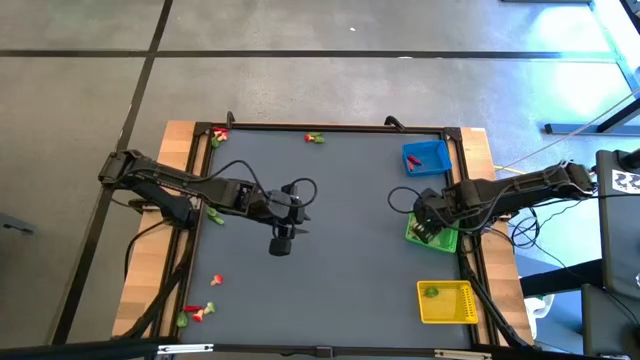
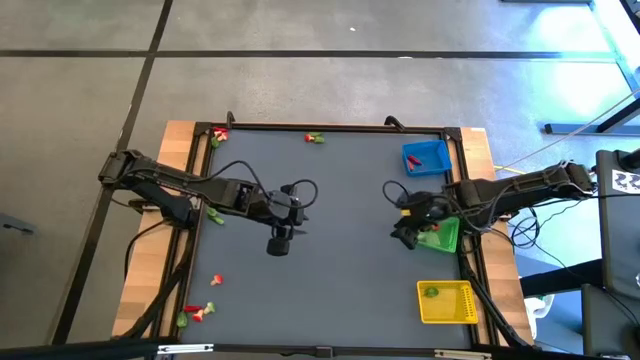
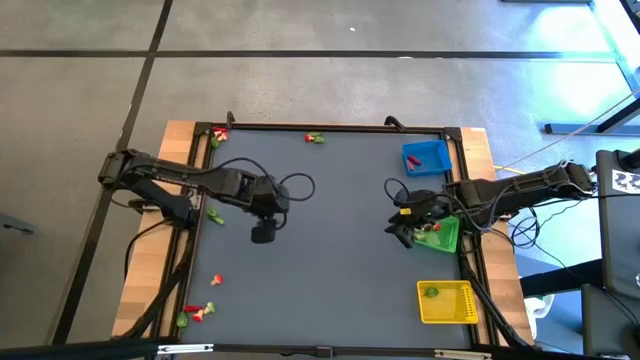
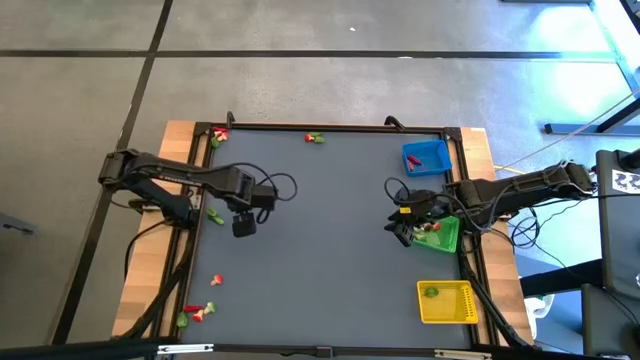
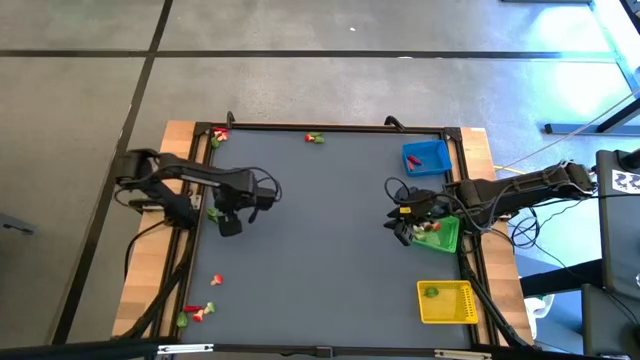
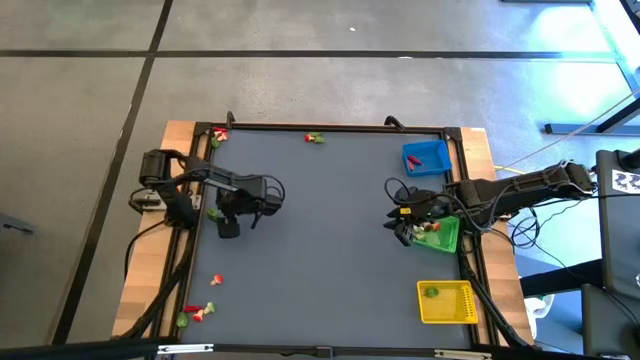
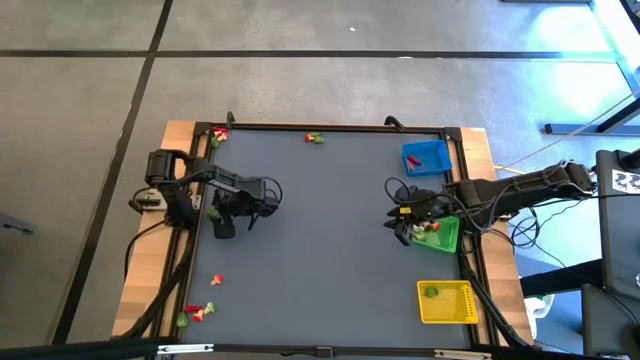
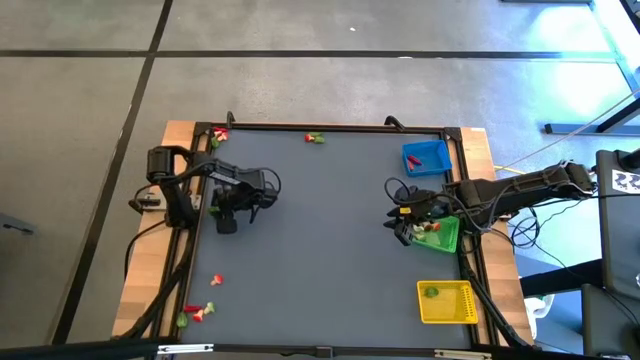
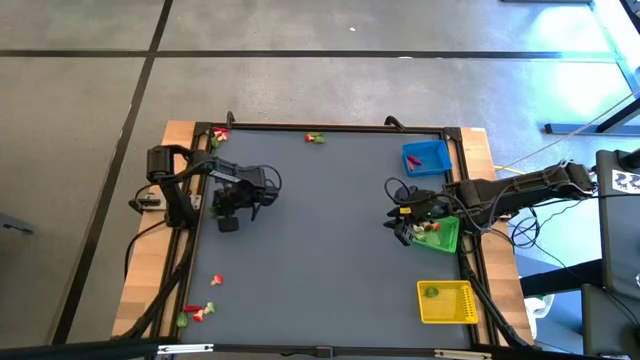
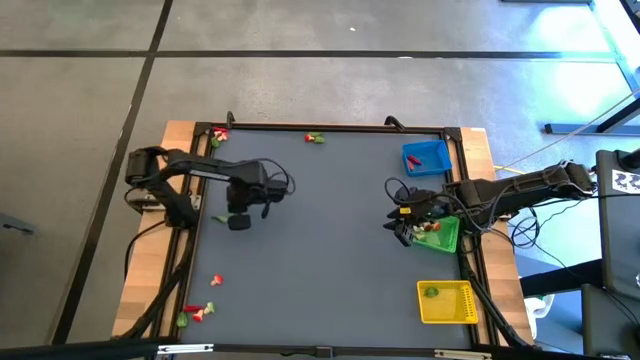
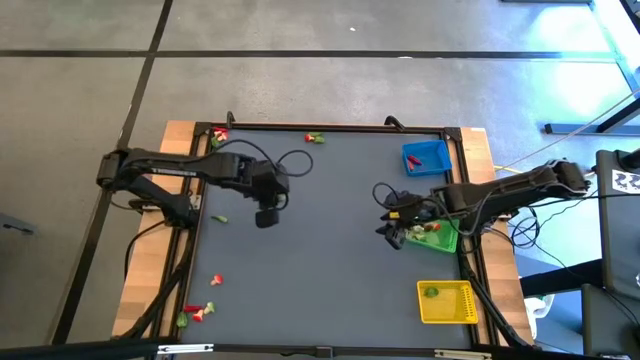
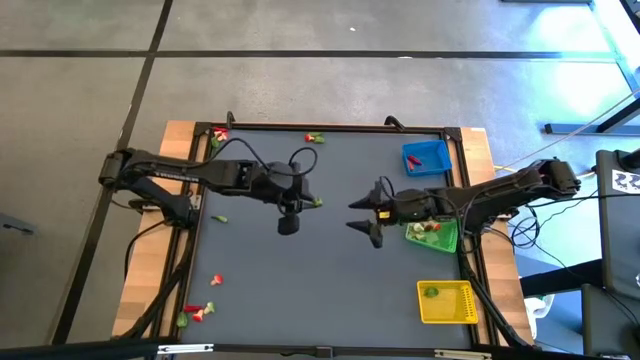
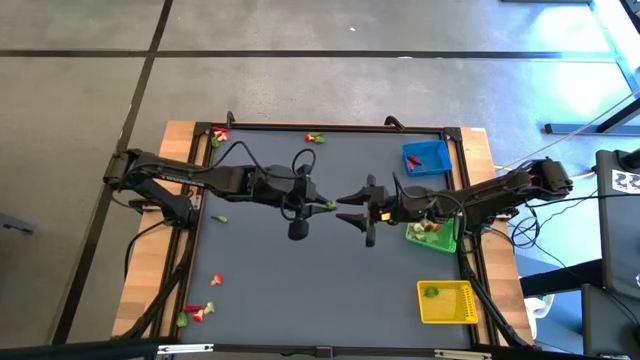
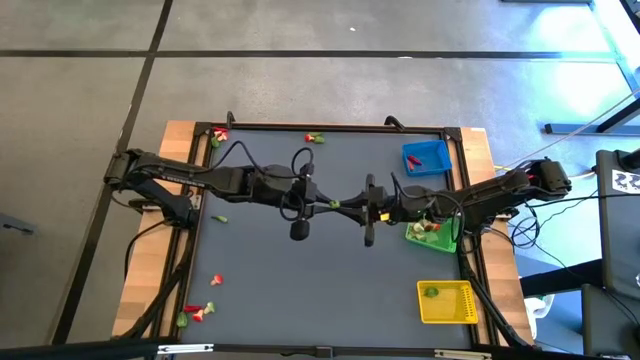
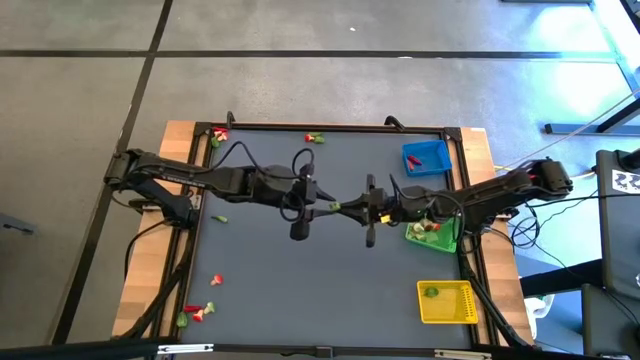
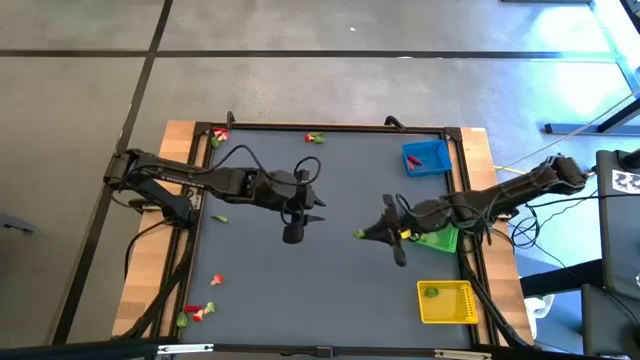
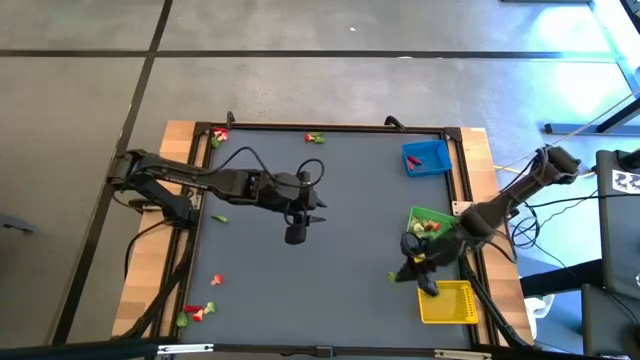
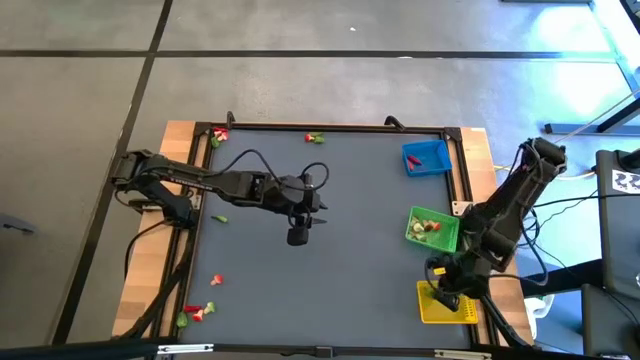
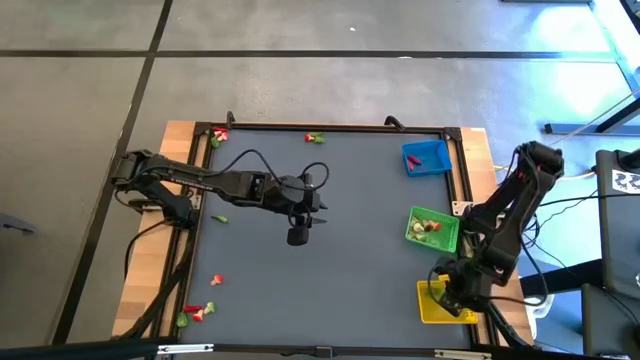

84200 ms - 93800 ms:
Task: Sort produce into baskets
Put the green capsicum into the yellow basket

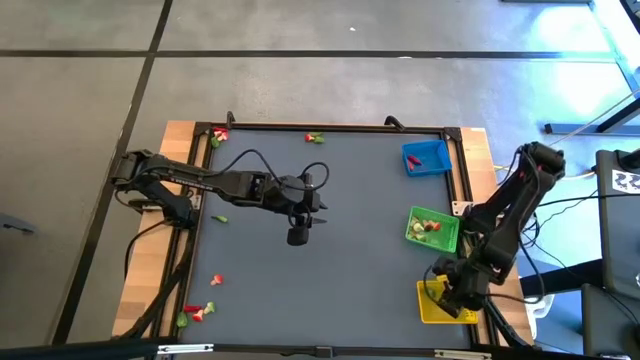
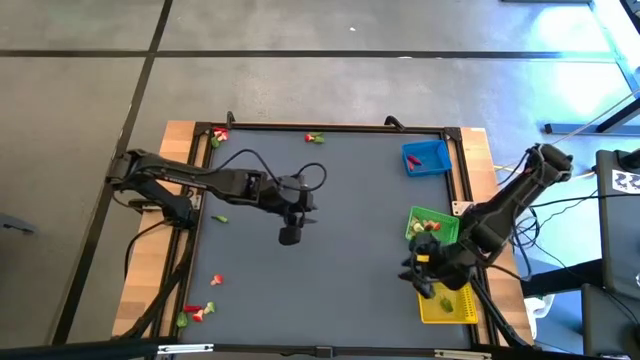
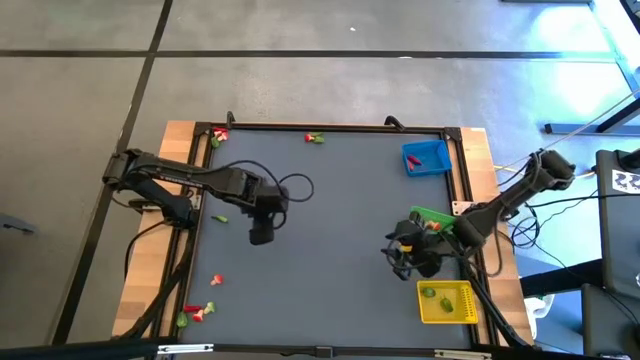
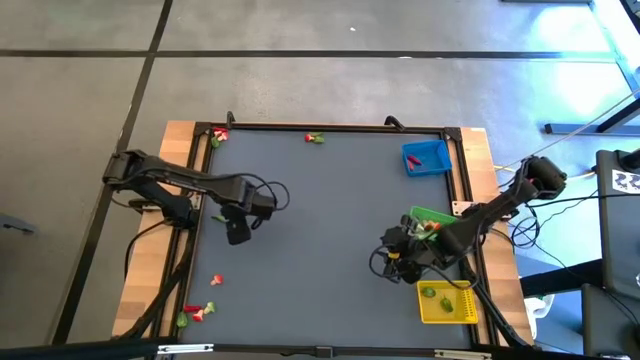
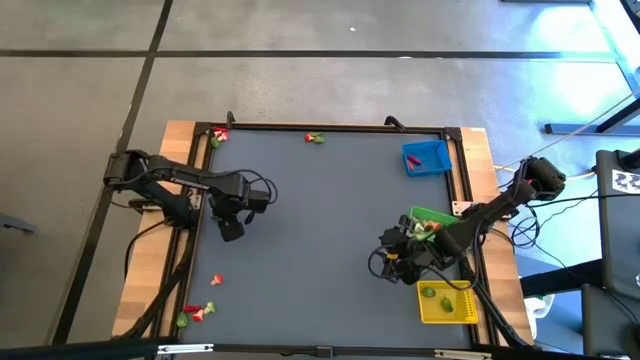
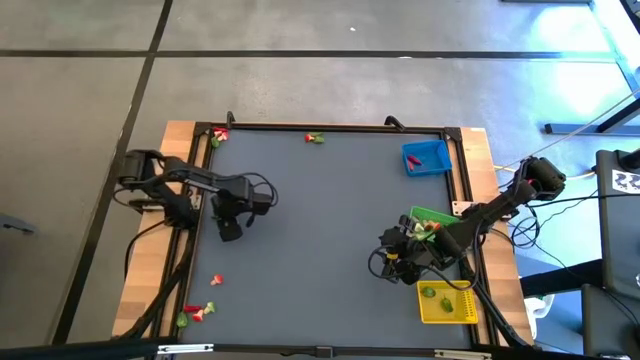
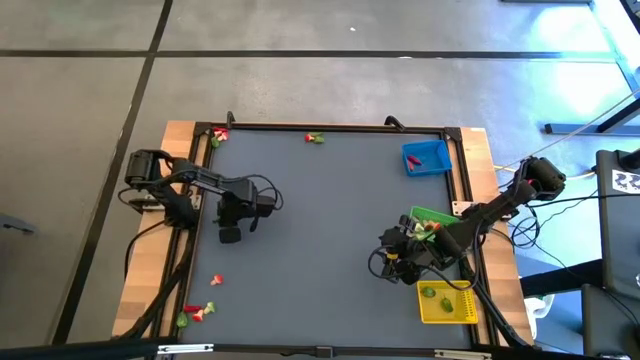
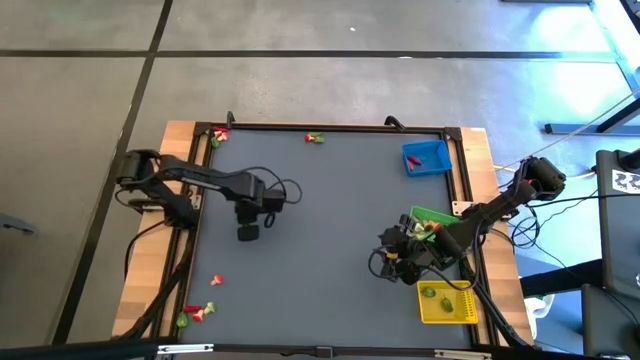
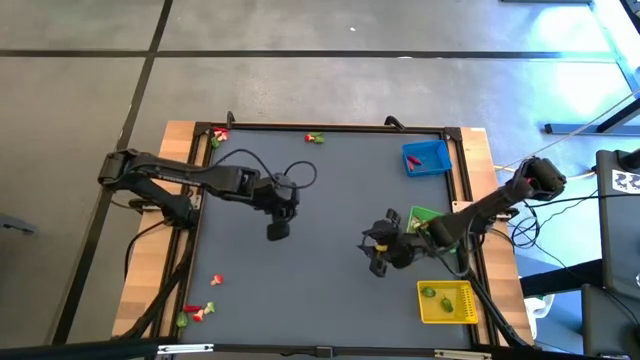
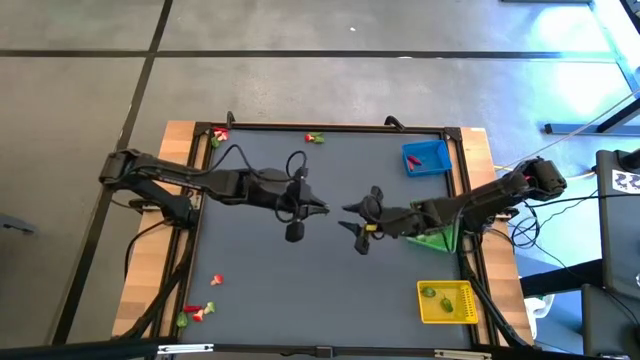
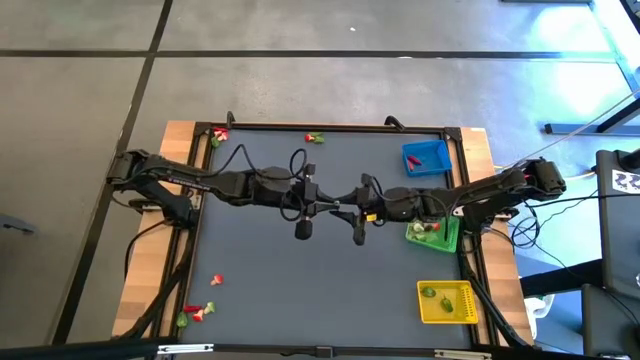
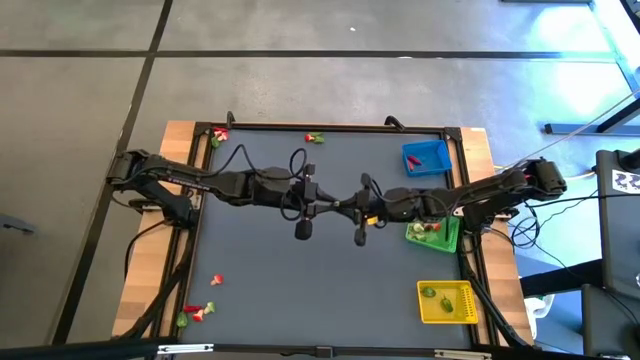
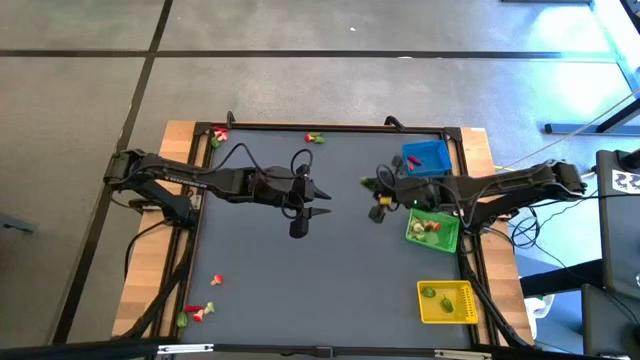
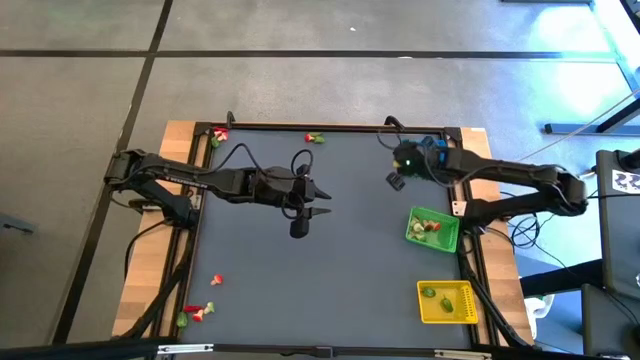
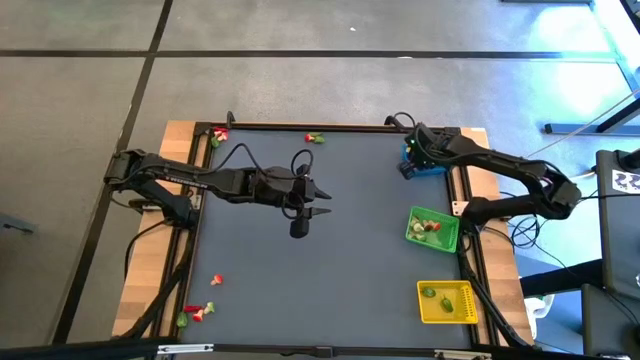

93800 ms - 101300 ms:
Put the green chili pepper into the blue basket

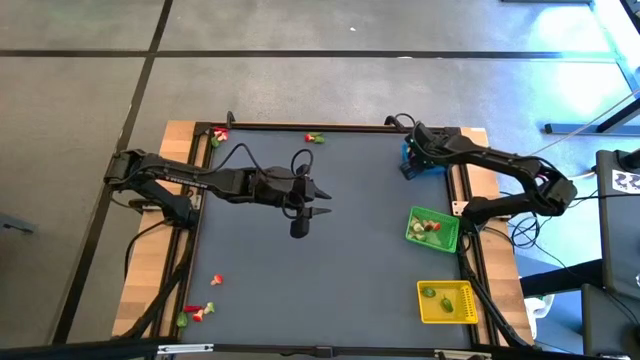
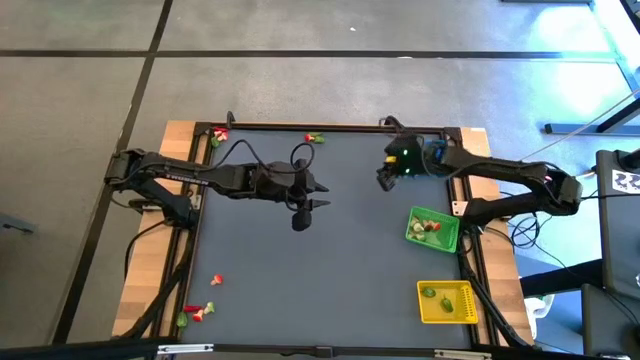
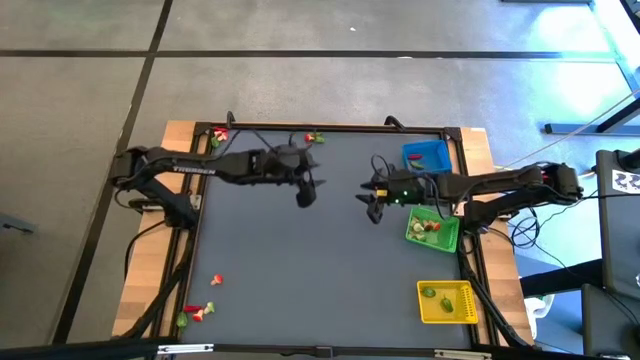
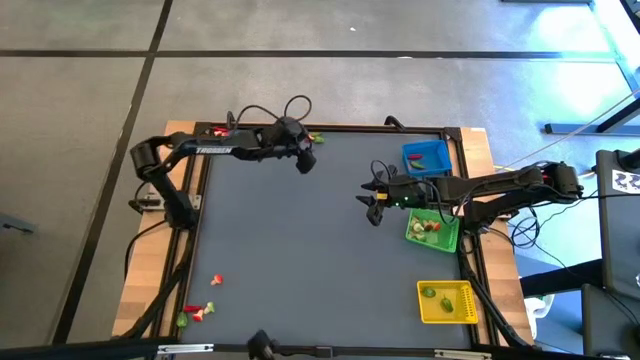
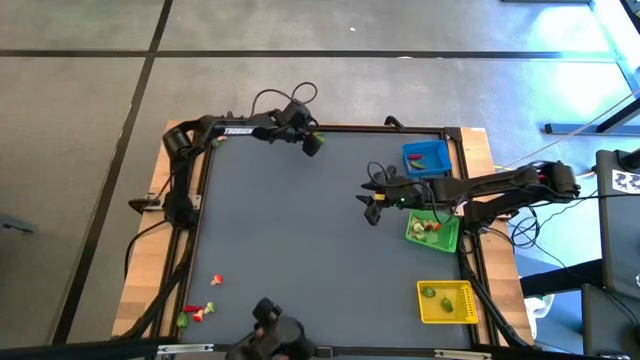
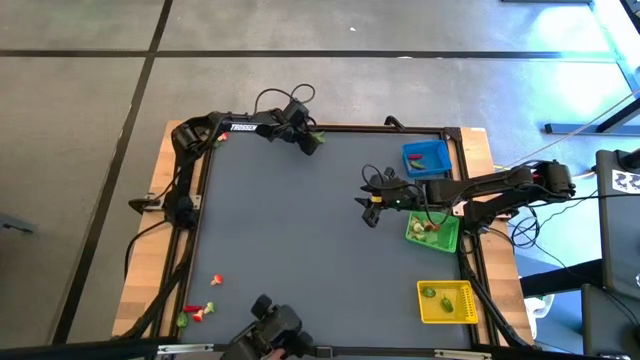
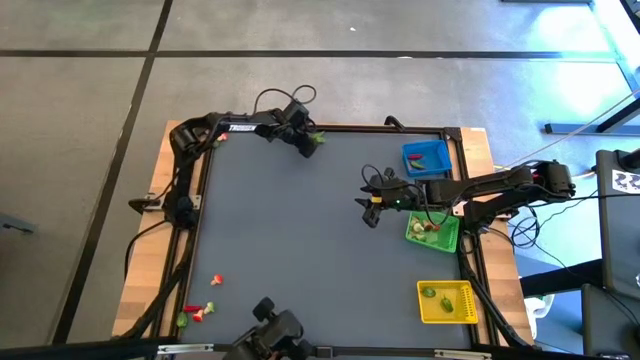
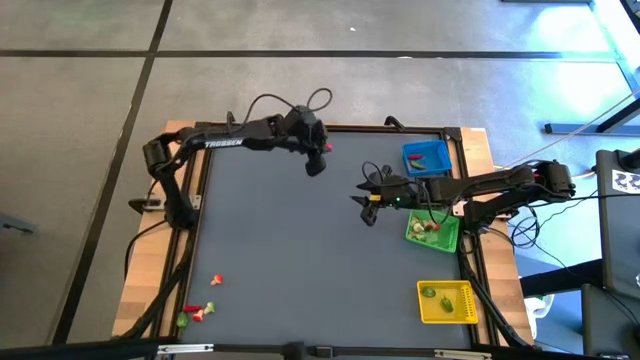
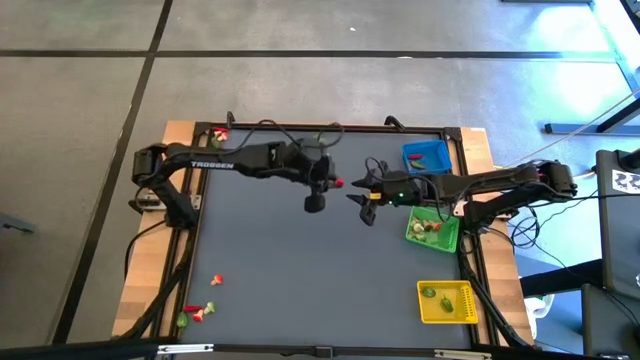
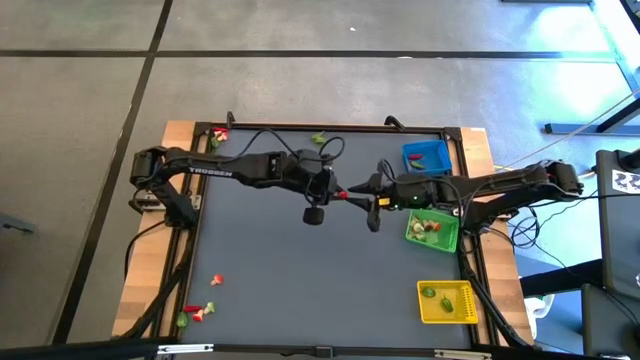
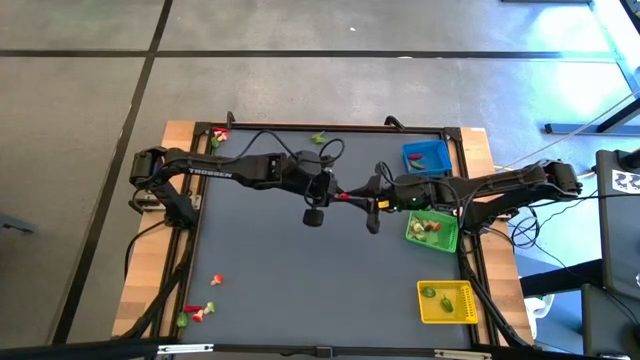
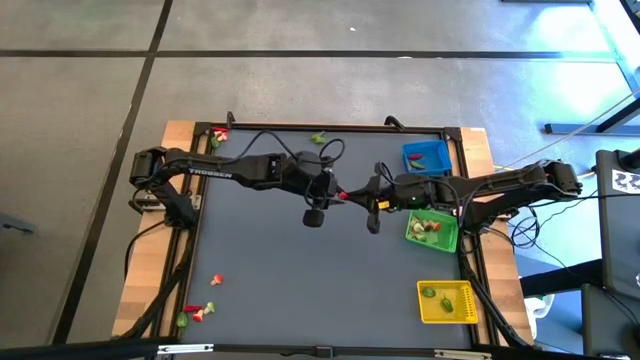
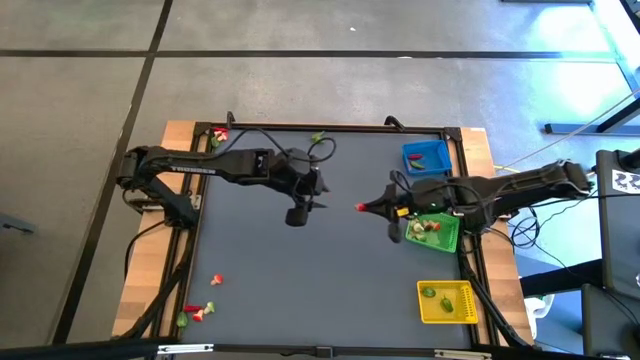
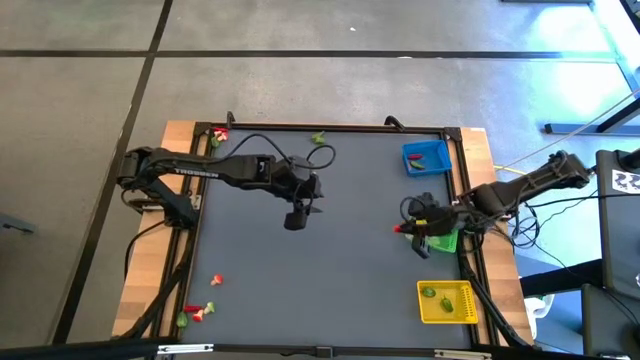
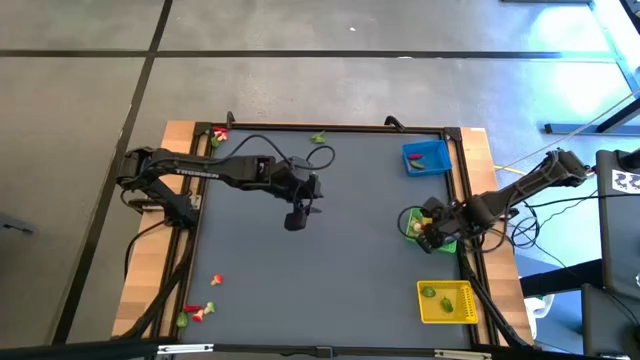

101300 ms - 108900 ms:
Put the red mushroom into the green basket
